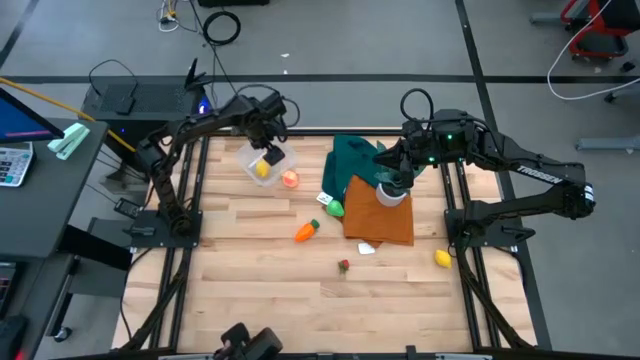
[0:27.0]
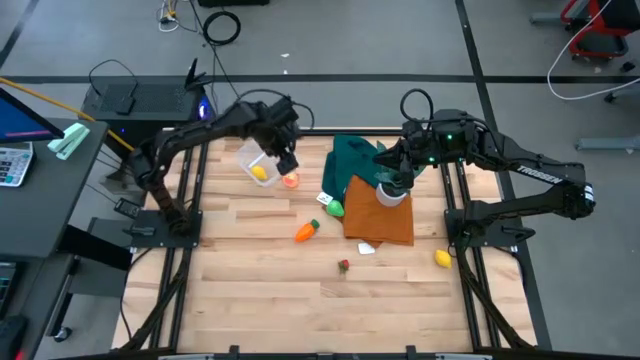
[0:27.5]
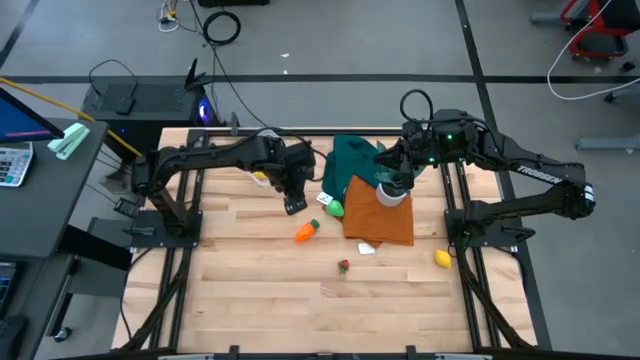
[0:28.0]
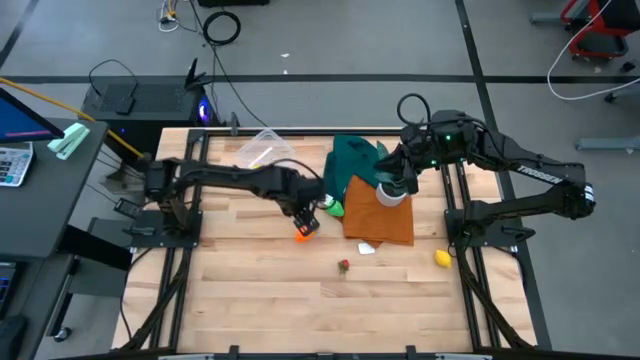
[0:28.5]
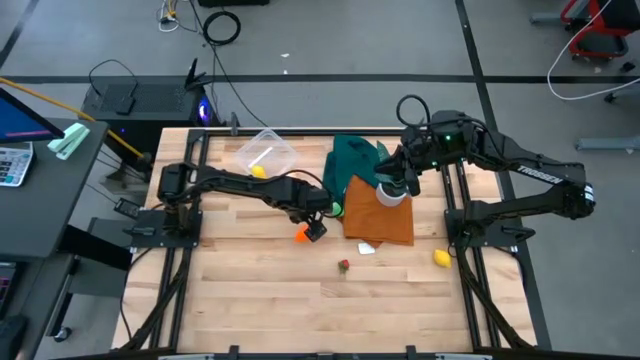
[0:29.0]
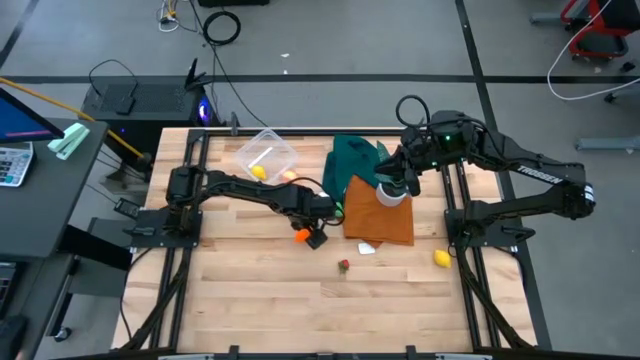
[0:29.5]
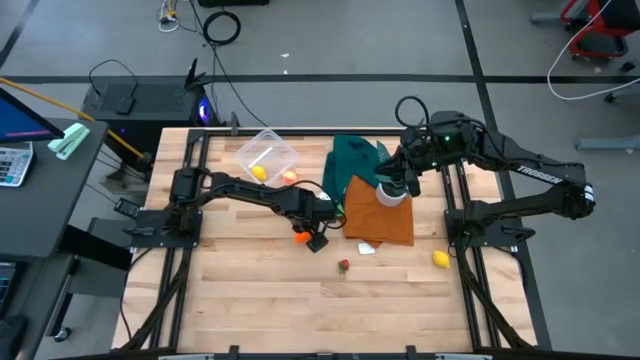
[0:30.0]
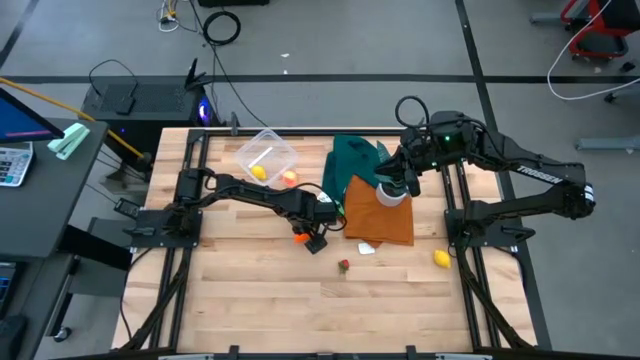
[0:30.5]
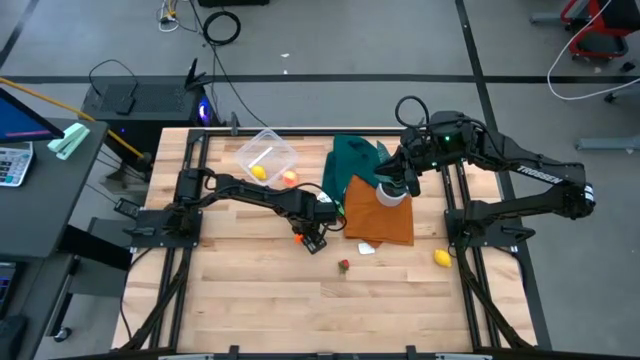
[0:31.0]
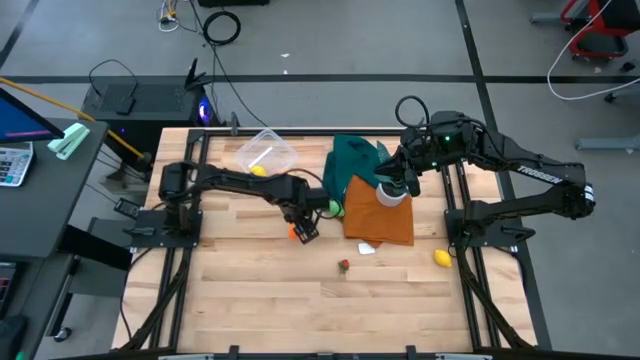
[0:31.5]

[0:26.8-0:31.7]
Task: Pick and placing Produce into tupperware
Put the carrot into the transparent container

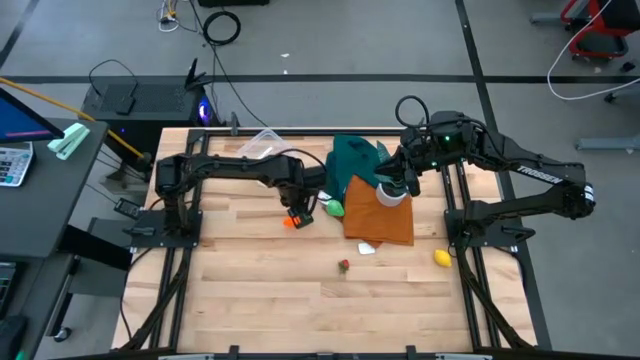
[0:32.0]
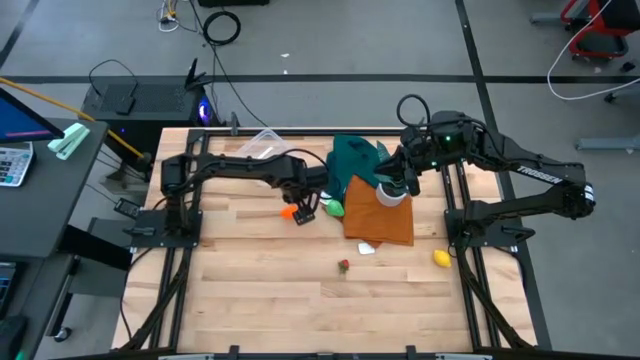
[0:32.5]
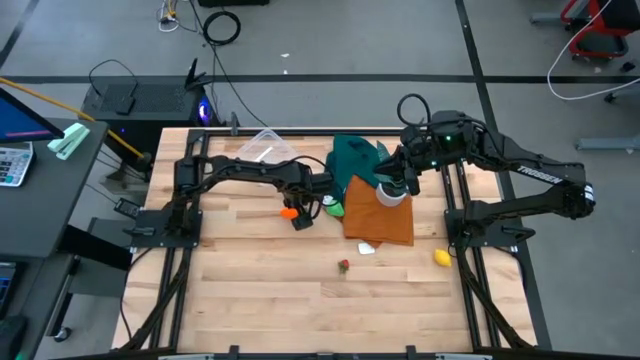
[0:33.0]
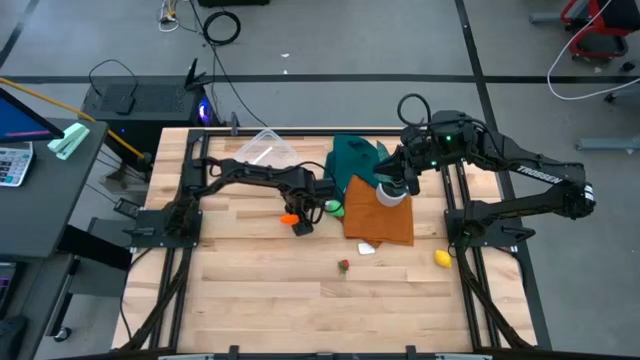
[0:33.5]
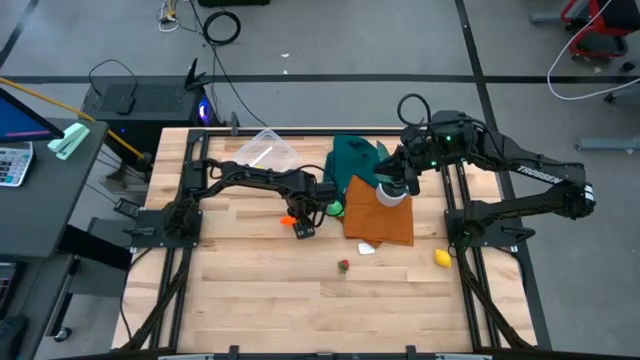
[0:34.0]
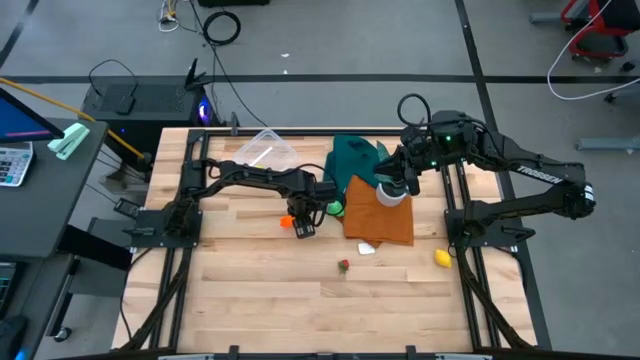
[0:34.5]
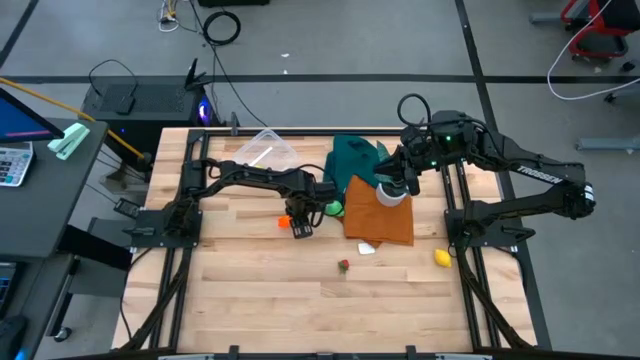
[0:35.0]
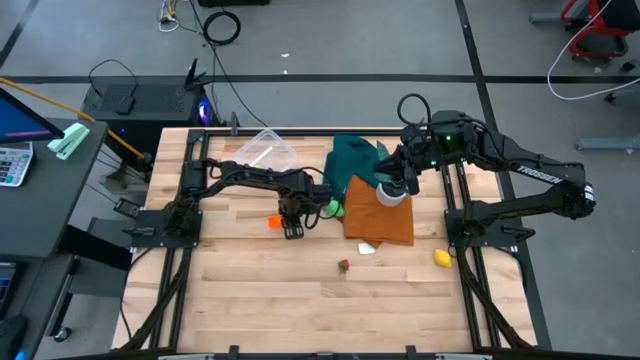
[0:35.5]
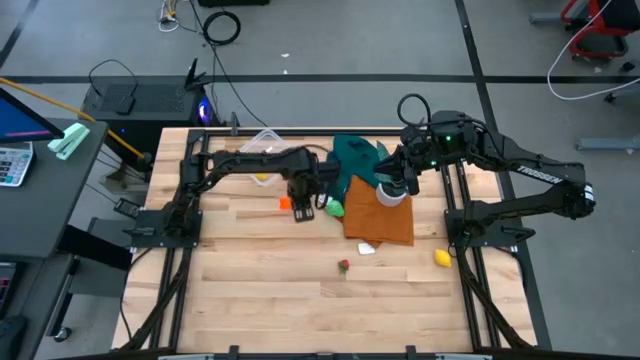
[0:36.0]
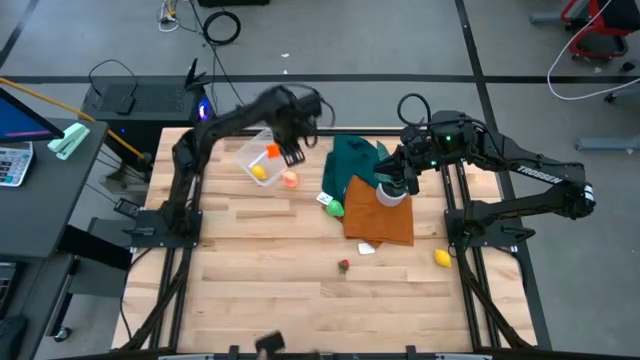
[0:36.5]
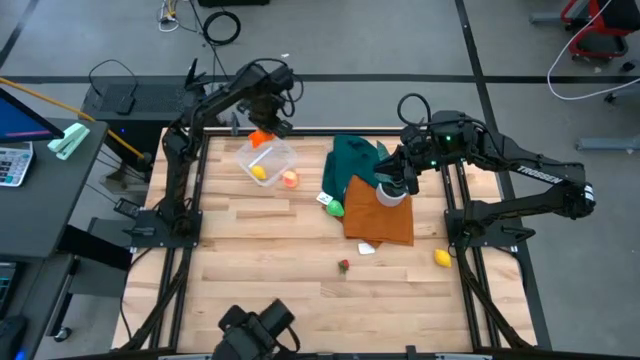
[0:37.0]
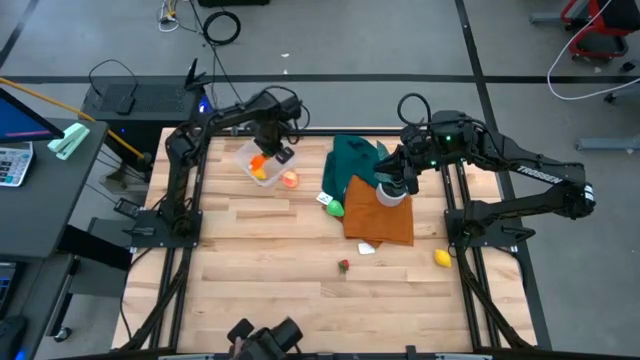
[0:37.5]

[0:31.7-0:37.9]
Put the carrot into the transparent container

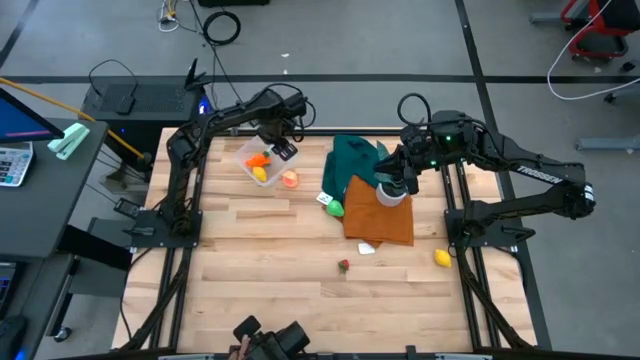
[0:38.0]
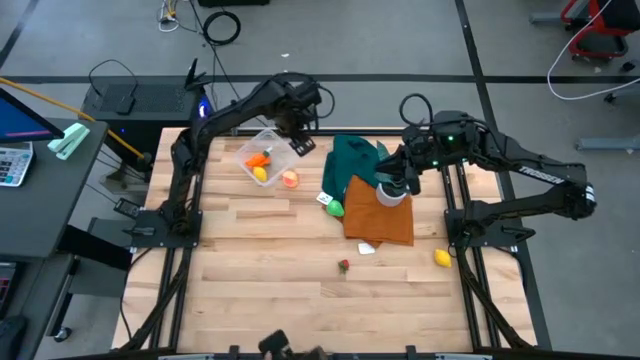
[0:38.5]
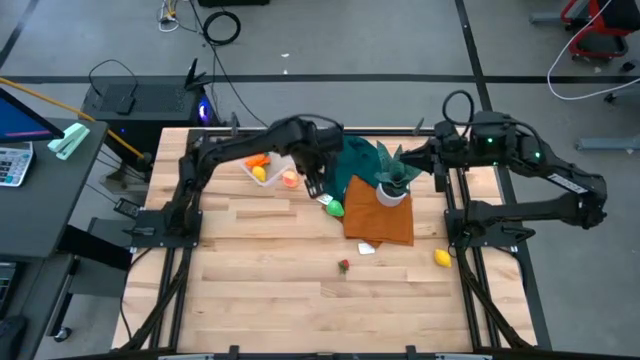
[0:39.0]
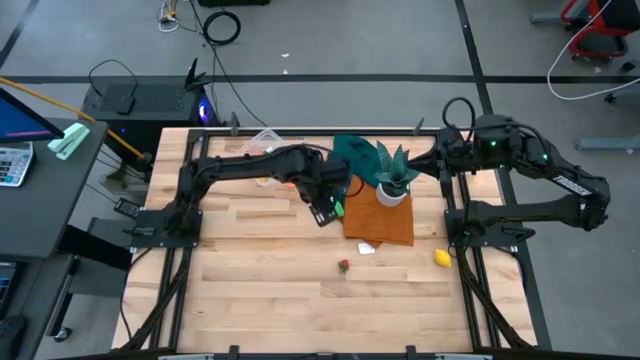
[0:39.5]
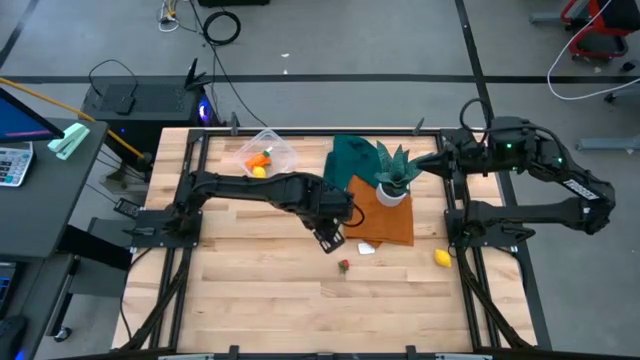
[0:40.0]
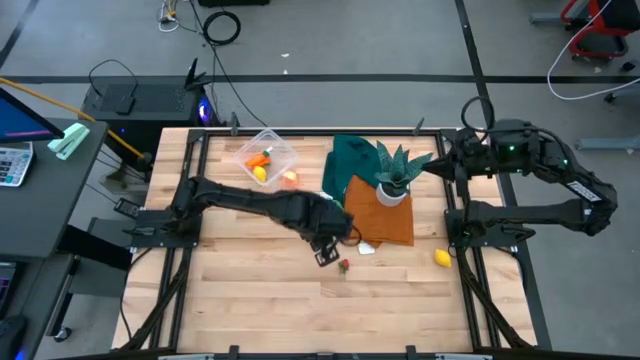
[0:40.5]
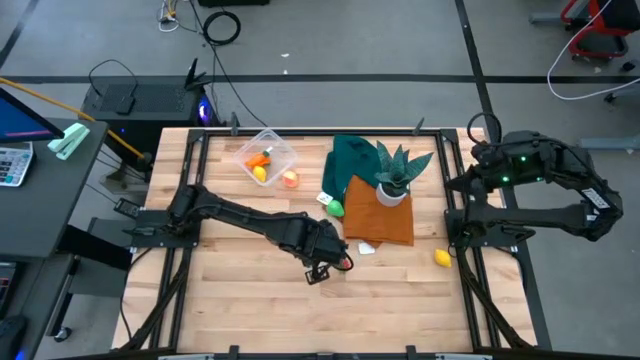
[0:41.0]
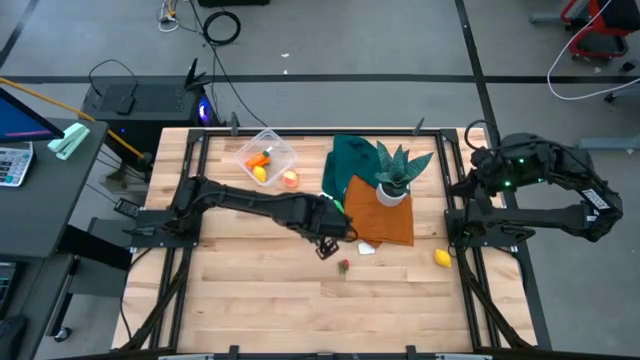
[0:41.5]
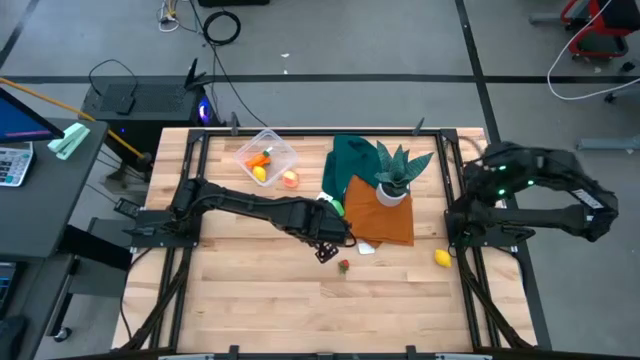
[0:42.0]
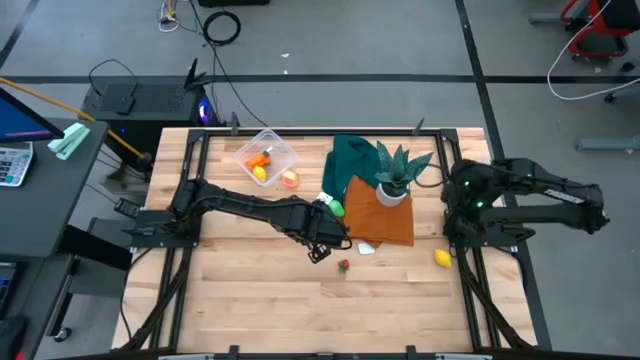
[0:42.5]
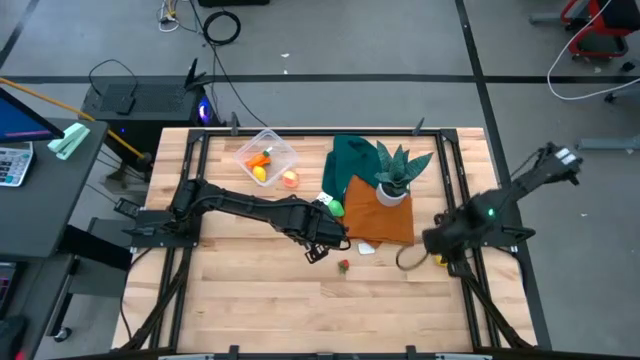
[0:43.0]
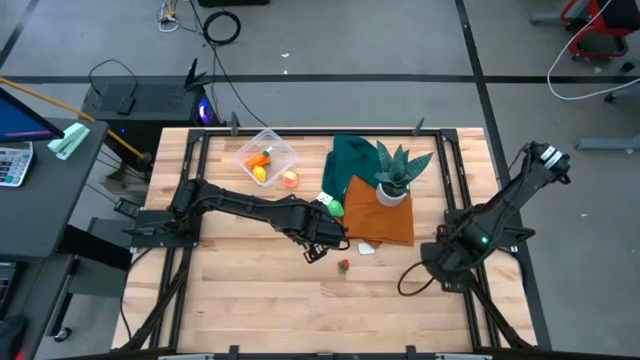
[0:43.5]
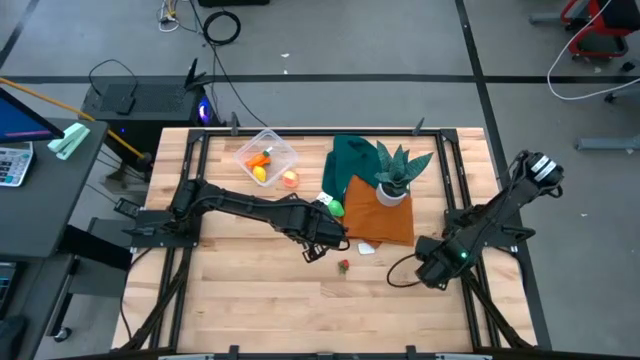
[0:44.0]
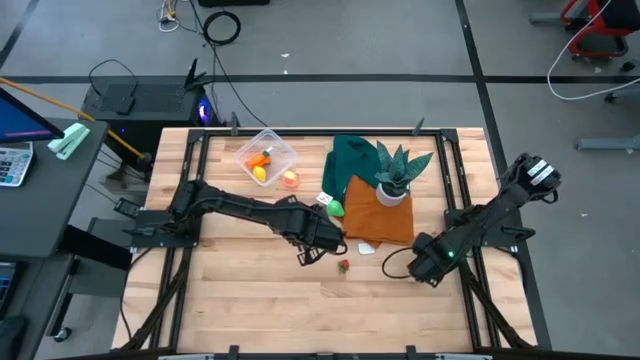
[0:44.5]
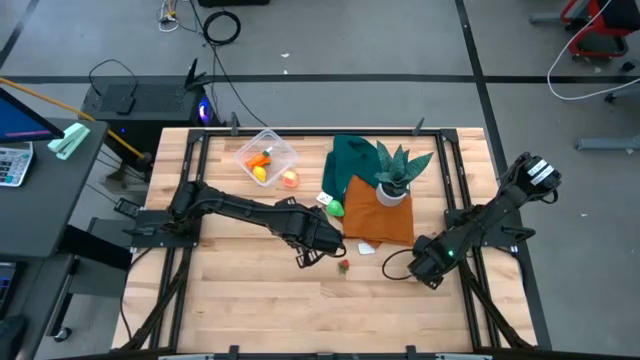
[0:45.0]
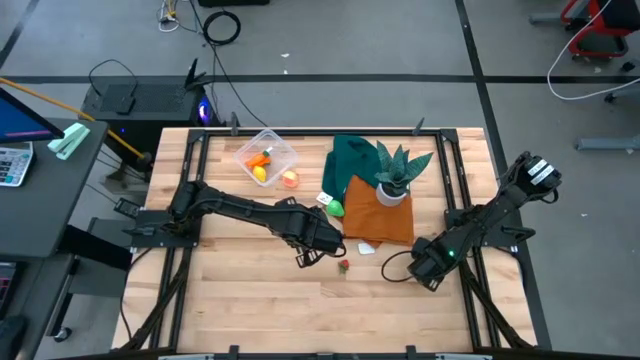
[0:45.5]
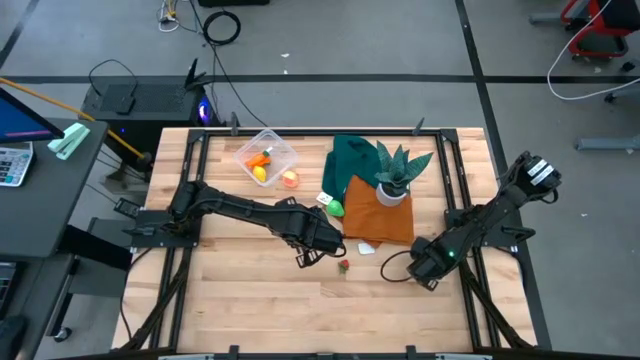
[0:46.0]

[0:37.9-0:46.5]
Put the lemon into the transparent container

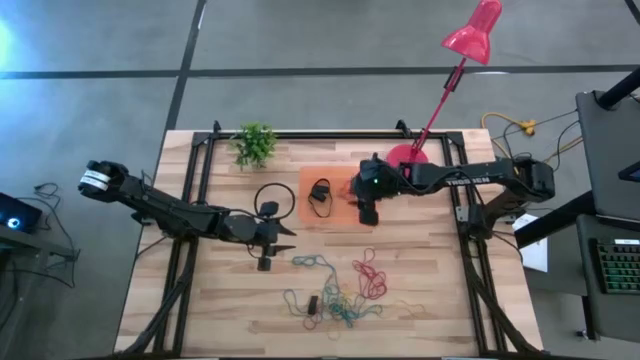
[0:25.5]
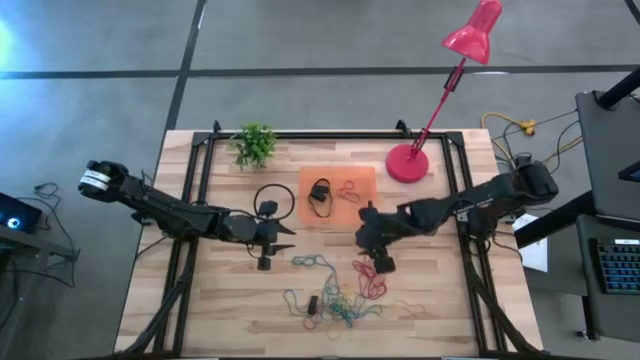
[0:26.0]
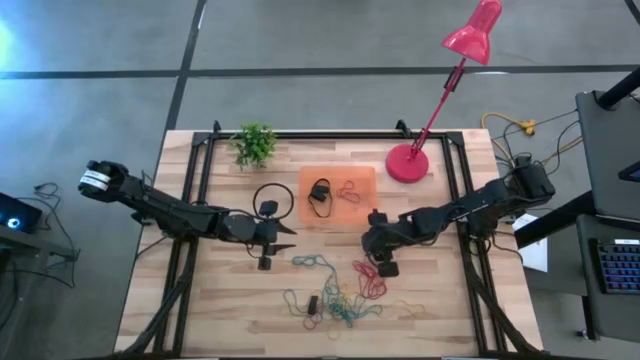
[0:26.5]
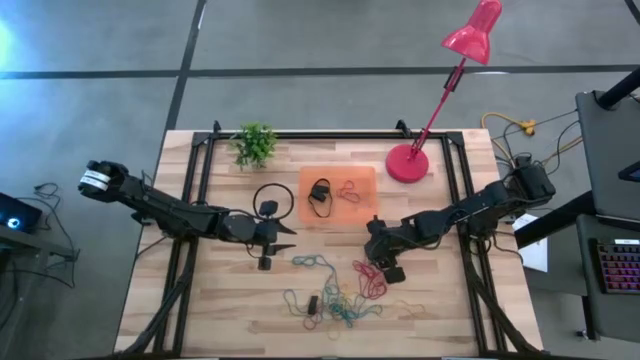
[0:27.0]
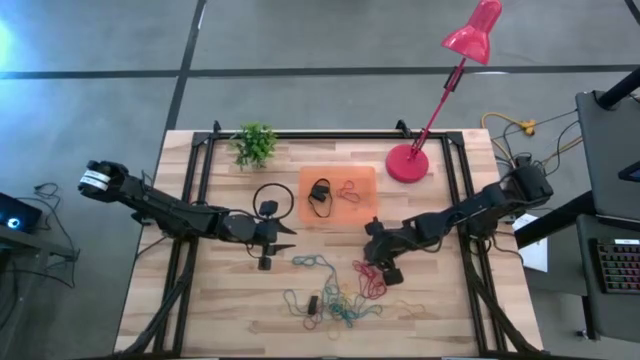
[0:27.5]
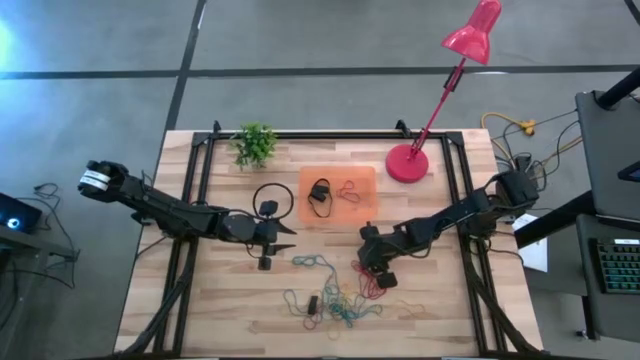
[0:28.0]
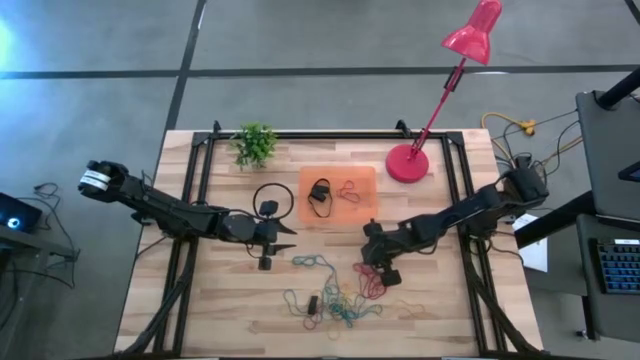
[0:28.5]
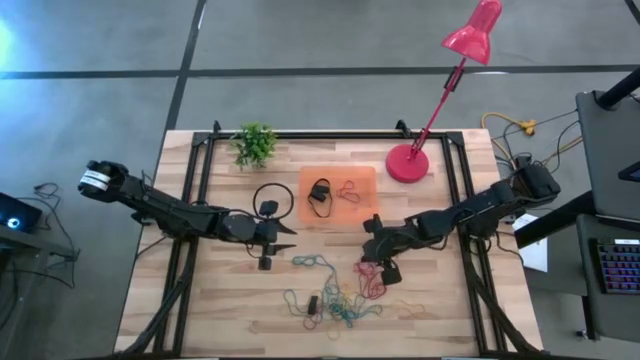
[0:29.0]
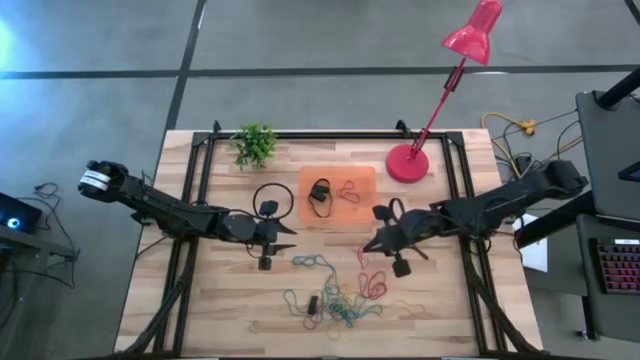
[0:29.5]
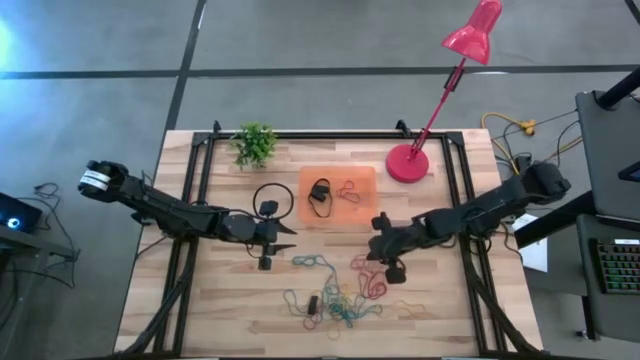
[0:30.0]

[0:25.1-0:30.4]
Task: Pick and place rubber bands into bin
Put the red rubber band into the bin
